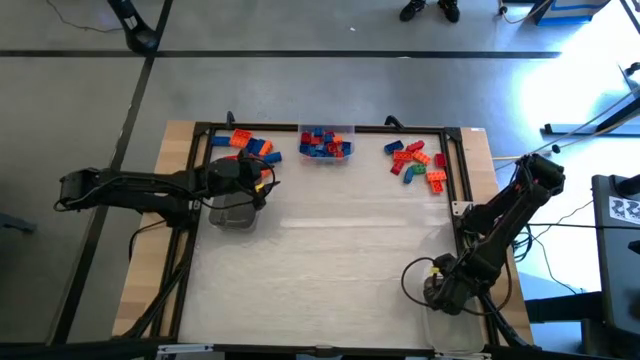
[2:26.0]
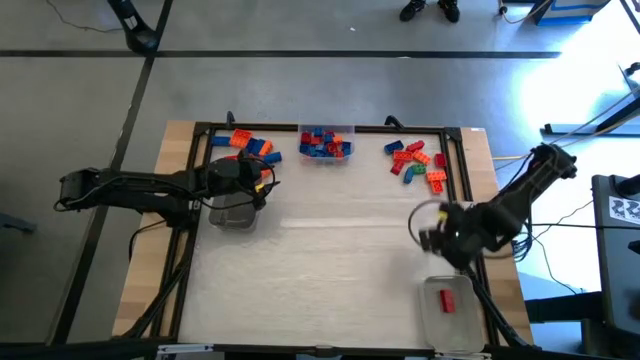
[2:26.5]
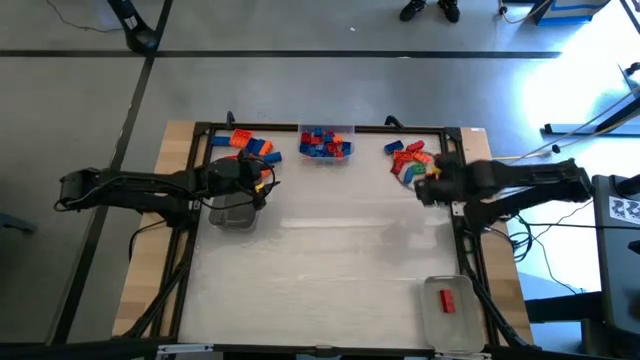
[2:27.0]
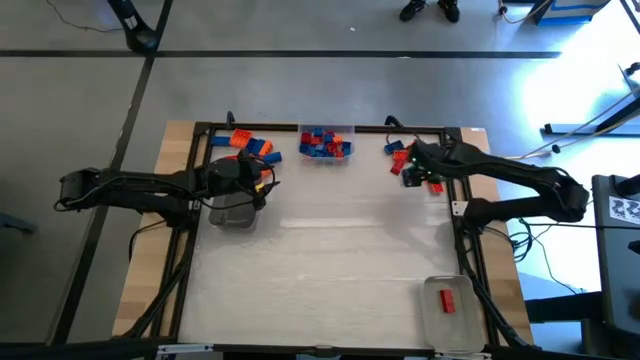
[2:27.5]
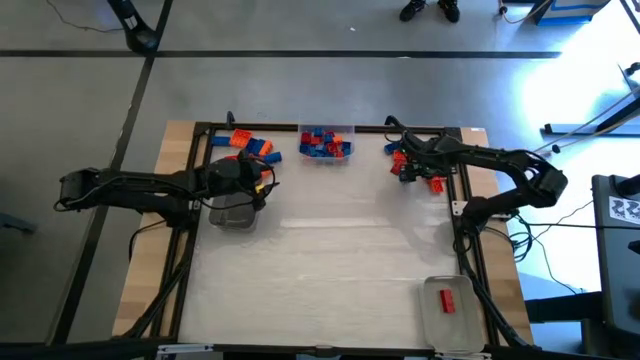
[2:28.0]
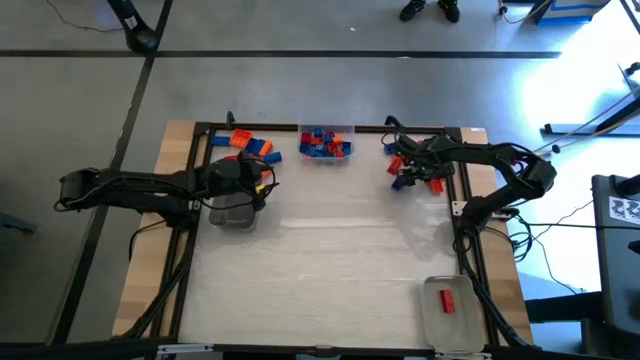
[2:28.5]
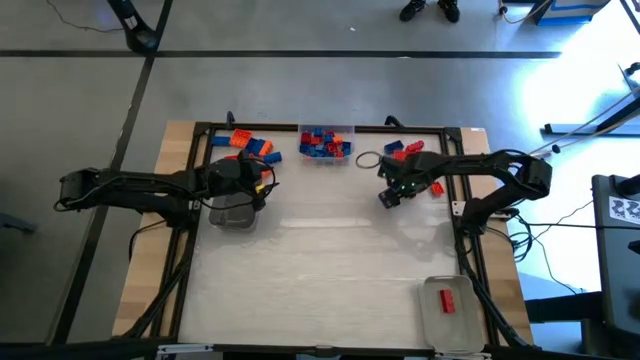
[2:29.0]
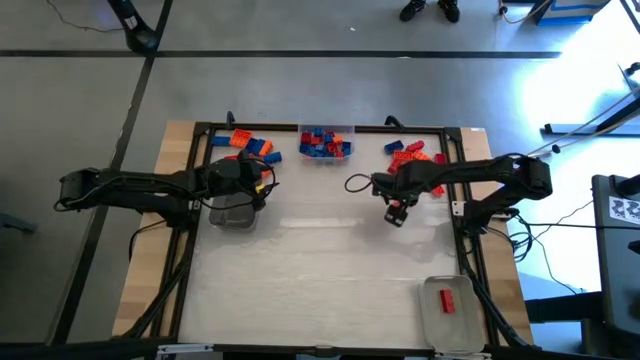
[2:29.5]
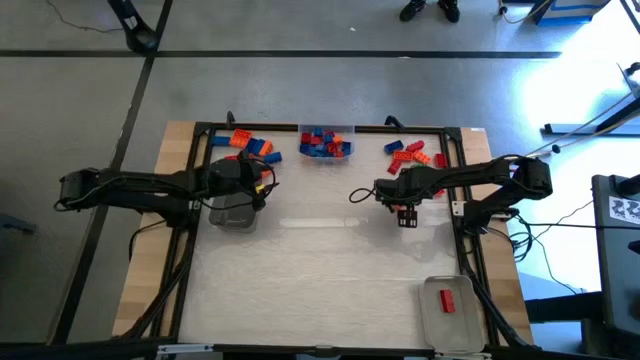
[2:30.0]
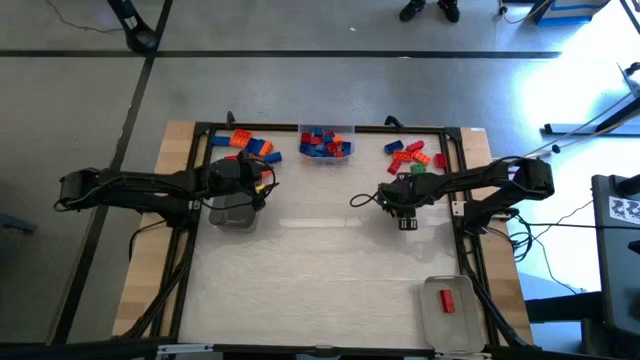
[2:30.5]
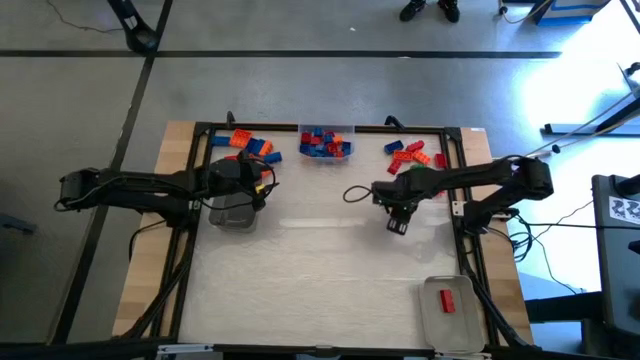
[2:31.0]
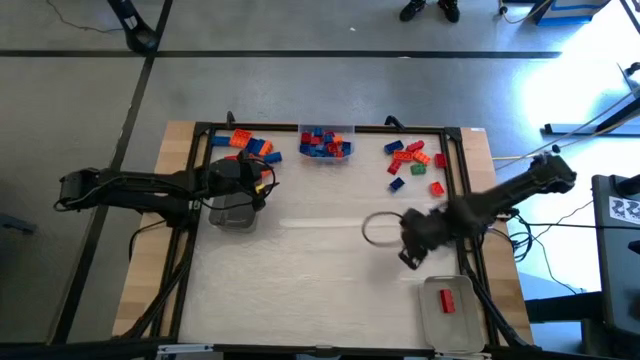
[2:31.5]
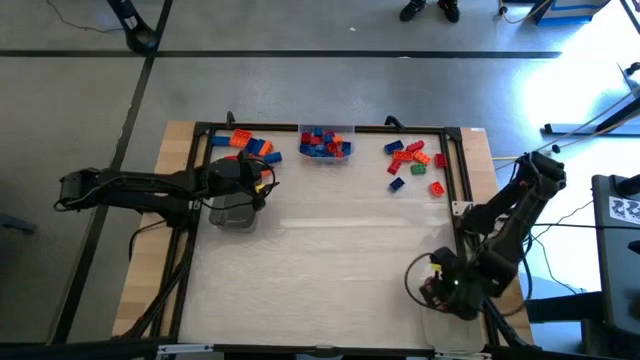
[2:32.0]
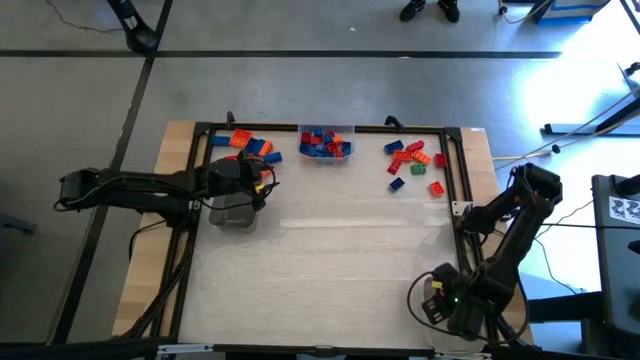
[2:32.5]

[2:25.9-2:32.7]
Task: Sort blocks by size
Put the orange 8 stud game piece into the gray bin

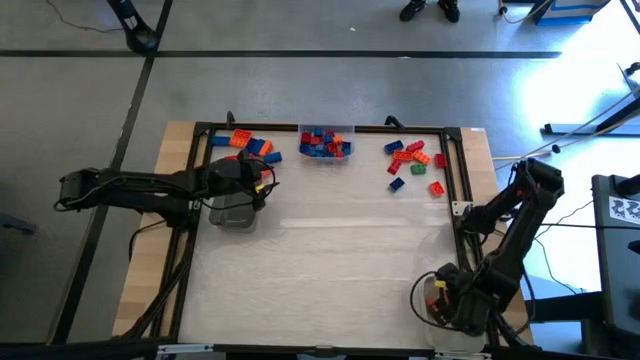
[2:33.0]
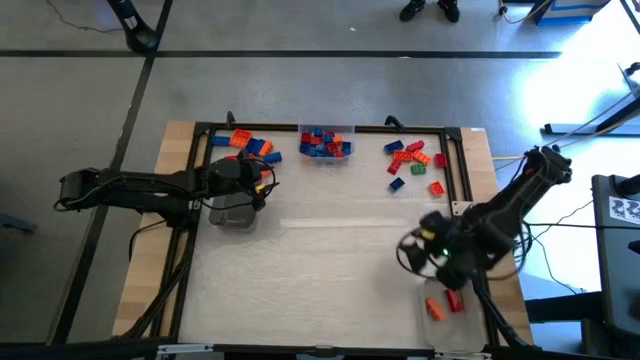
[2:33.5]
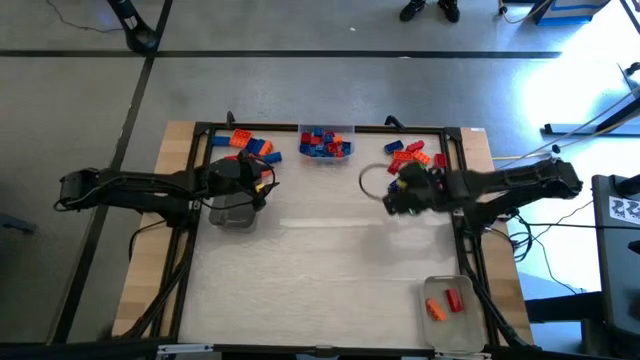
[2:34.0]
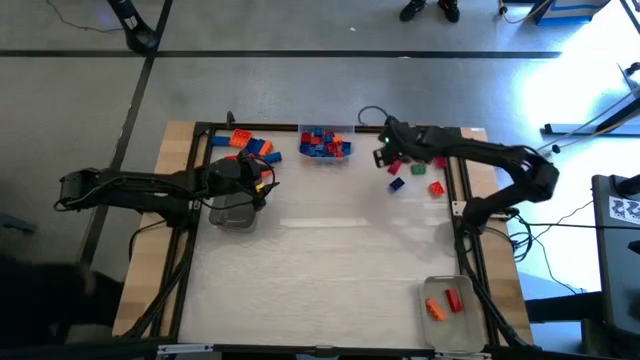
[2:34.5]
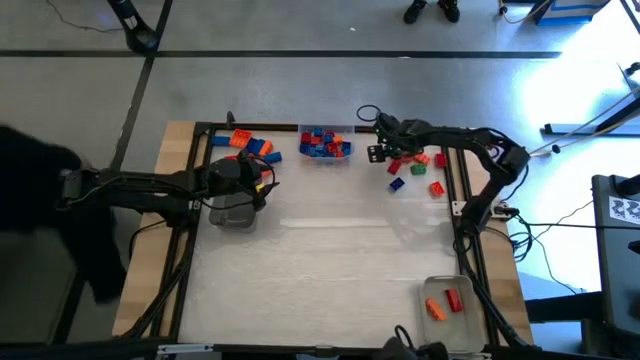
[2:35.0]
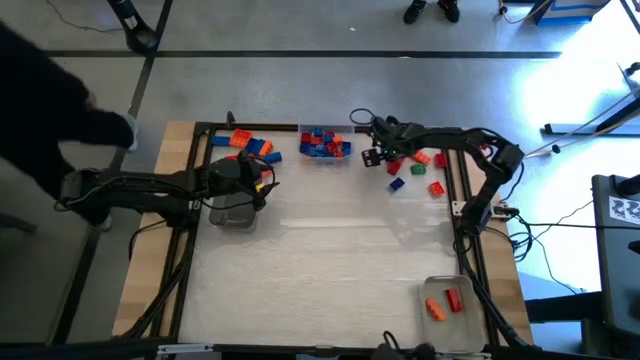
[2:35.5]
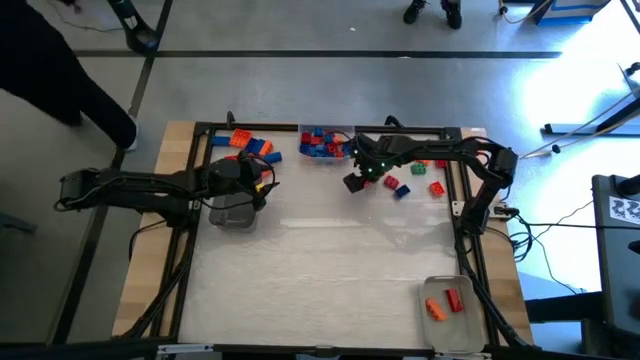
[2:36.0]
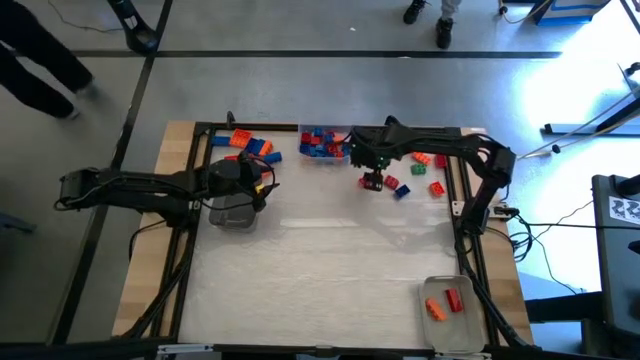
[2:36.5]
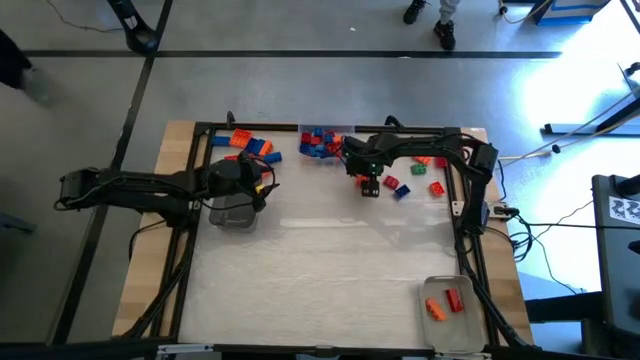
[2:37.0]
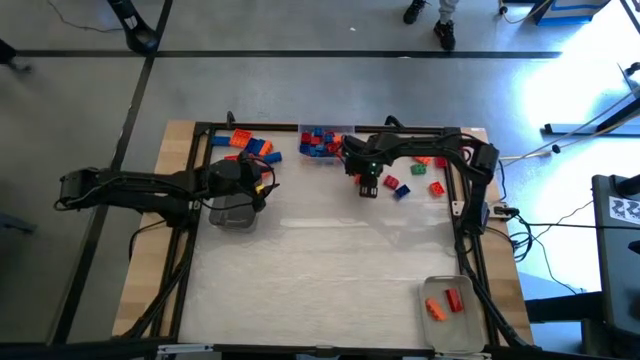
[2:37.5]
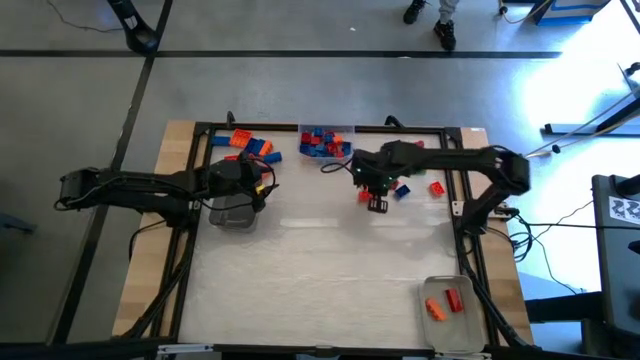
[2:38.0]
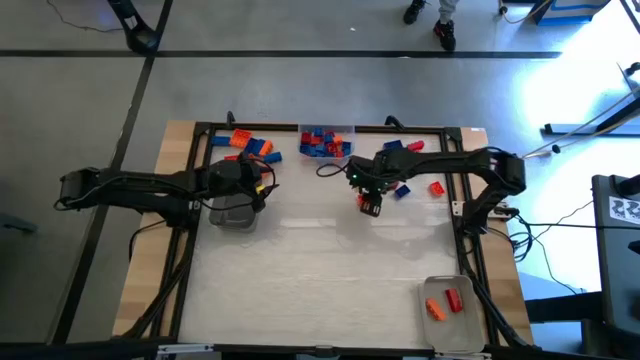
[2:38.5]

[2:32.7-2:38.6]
Put the orange 8 stud game piece into the gray bin

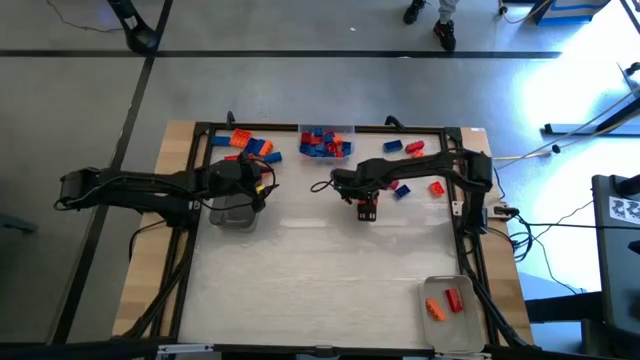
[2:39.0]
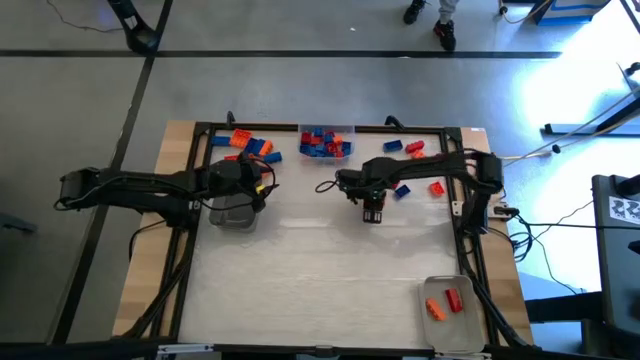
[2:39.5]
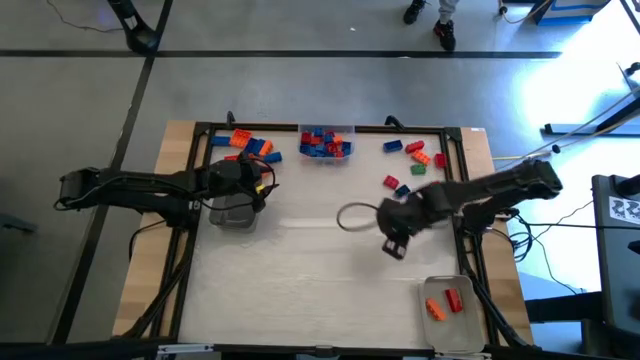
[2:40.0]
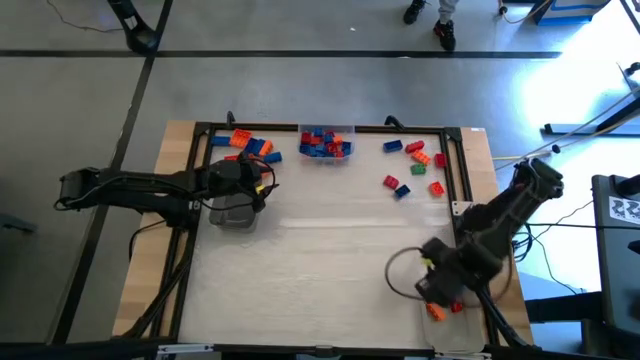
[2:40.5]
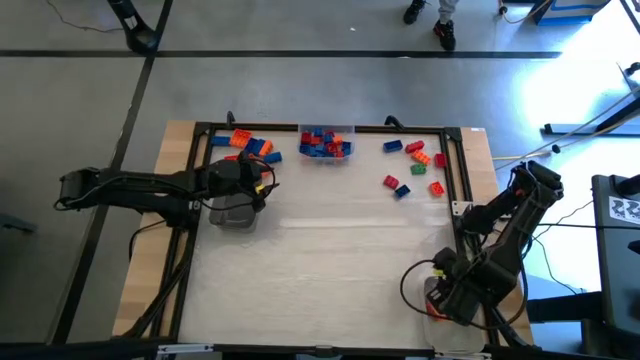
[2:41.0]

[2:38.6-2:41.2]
Put the orange 8 stud game piece into the gray bin

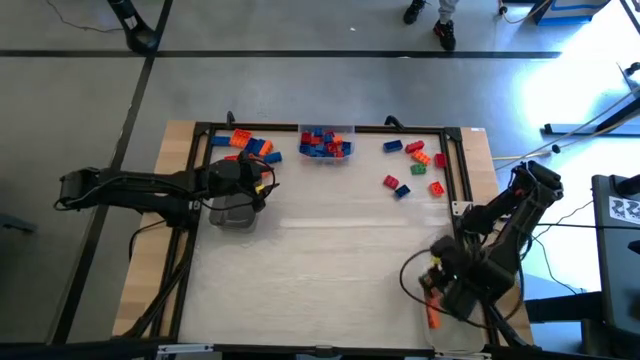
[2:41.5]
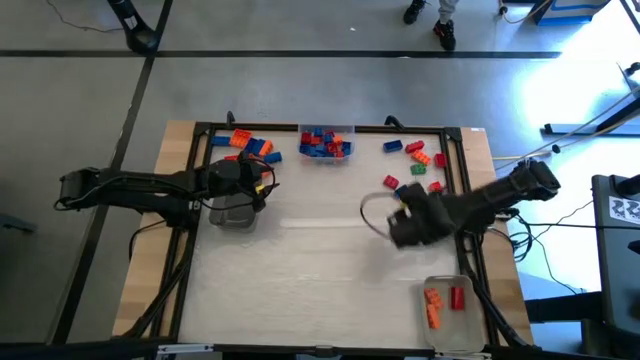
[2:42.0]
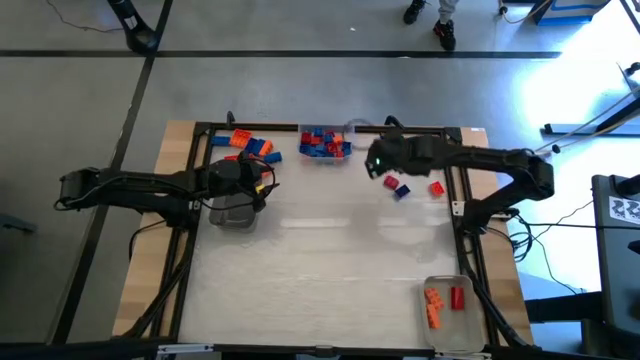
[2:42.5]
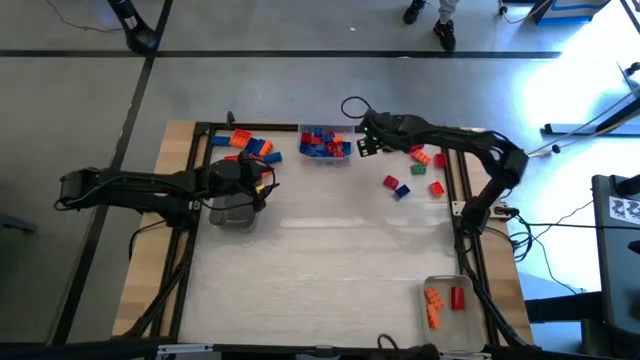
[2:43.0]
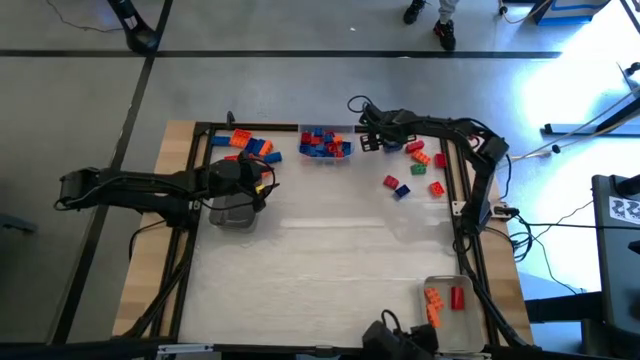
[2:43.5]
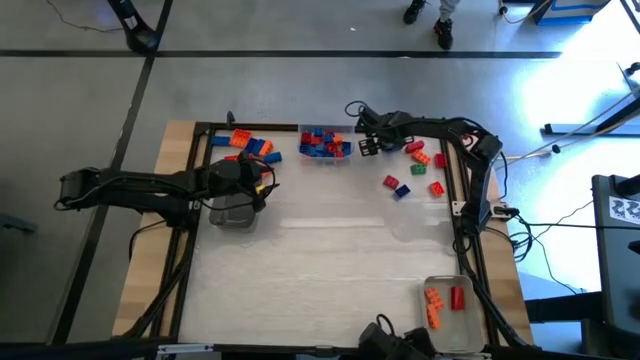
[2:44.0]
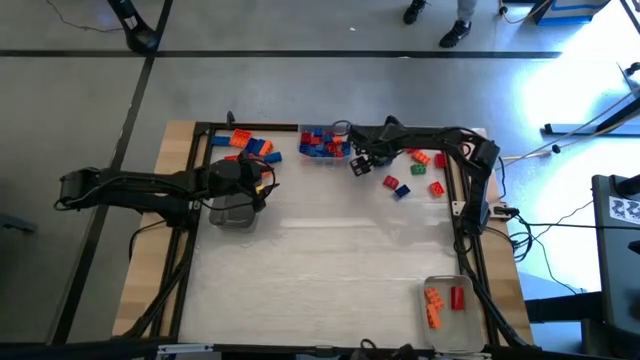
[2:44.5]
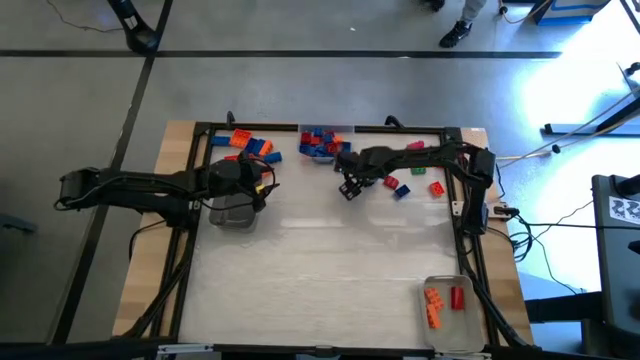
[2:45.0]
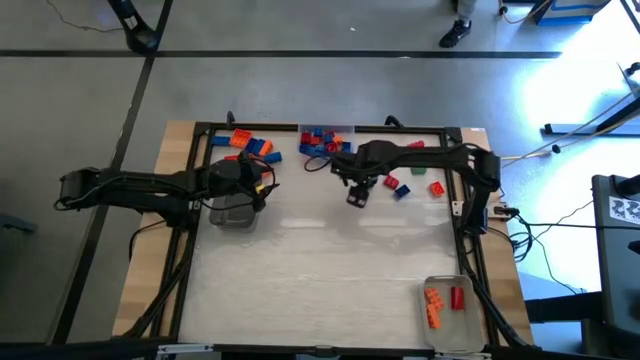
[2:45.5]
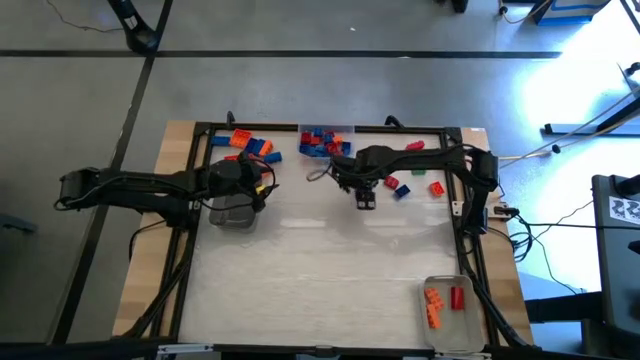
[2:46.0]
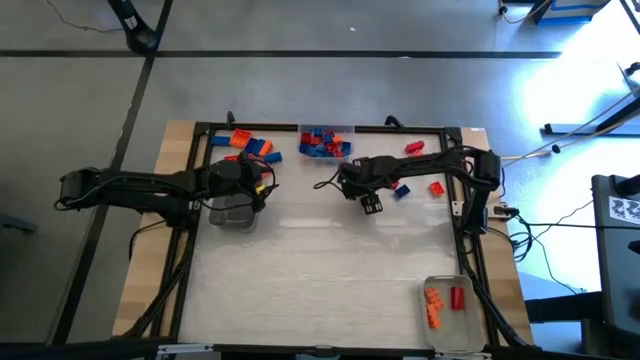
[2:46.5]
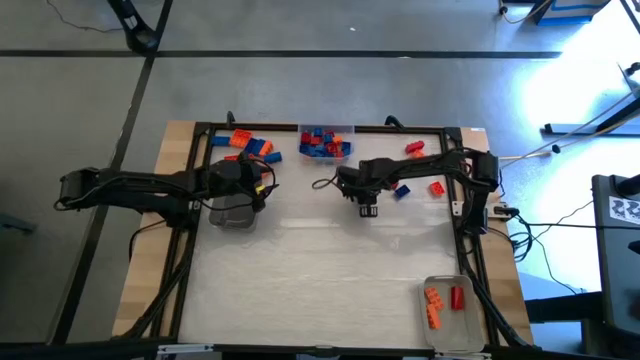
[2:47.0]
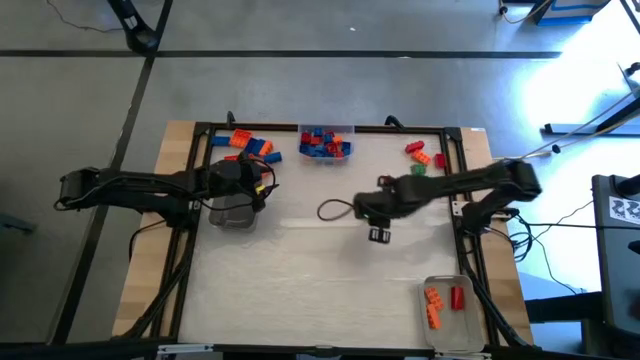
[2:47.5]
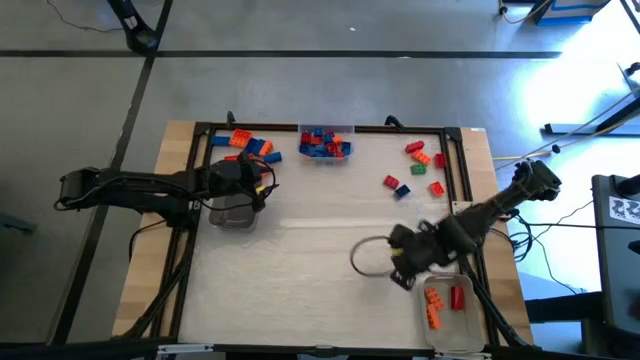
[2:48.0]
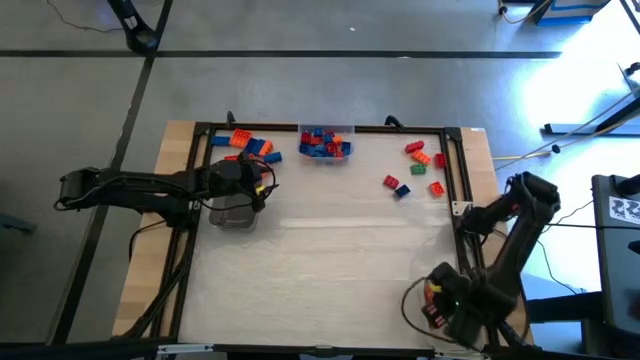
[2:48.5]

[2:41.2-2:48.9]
Put the blue 8 stud game piece into the gray bin
